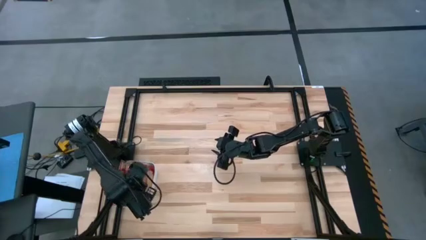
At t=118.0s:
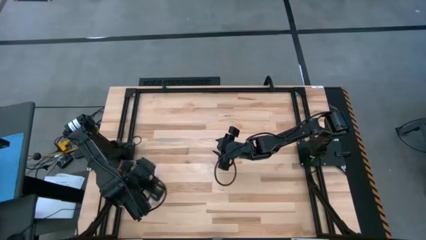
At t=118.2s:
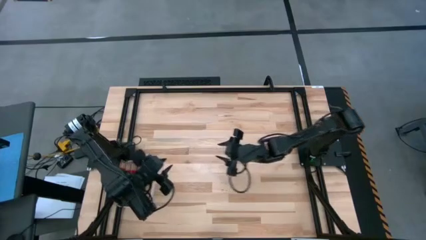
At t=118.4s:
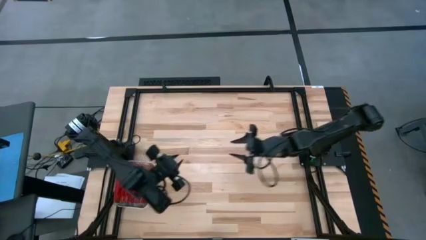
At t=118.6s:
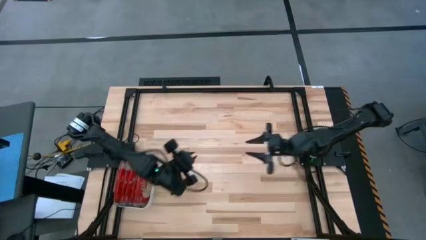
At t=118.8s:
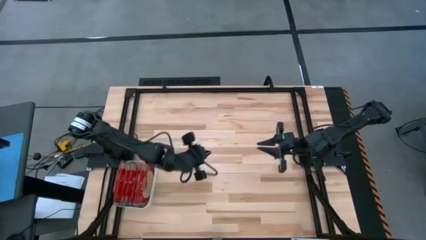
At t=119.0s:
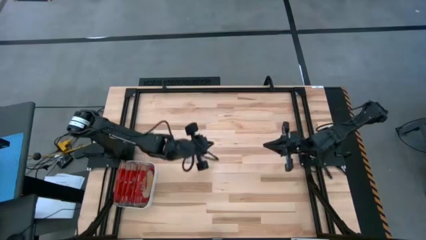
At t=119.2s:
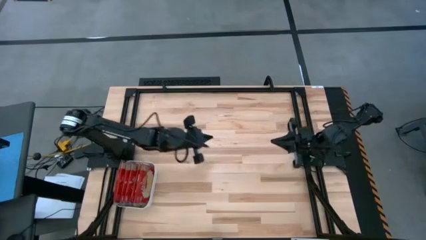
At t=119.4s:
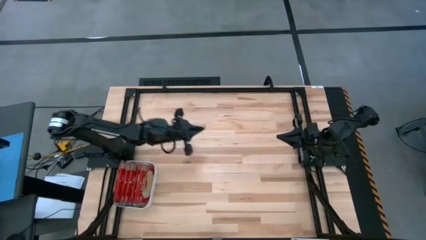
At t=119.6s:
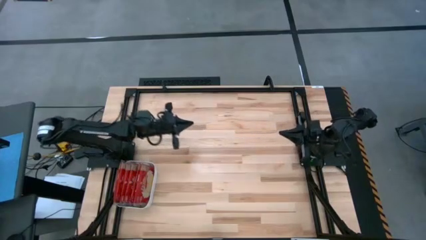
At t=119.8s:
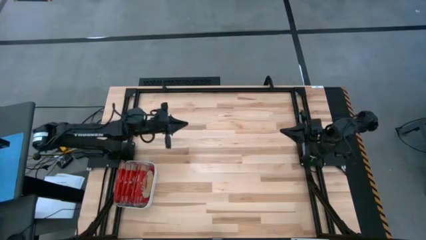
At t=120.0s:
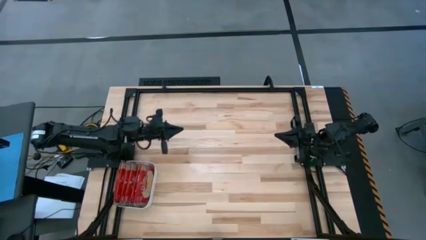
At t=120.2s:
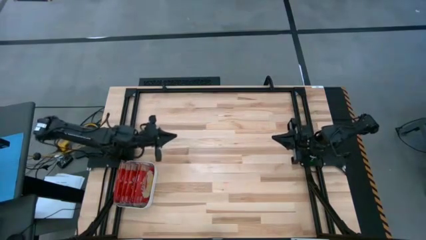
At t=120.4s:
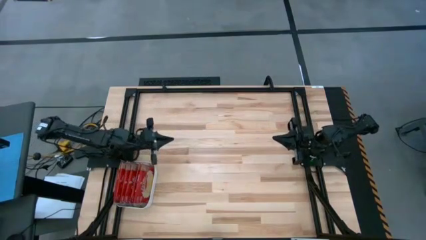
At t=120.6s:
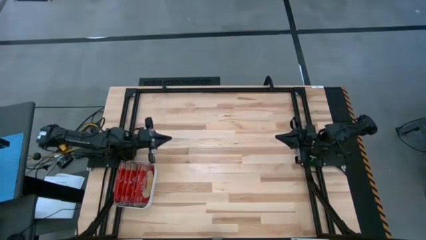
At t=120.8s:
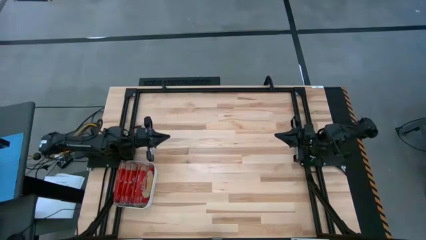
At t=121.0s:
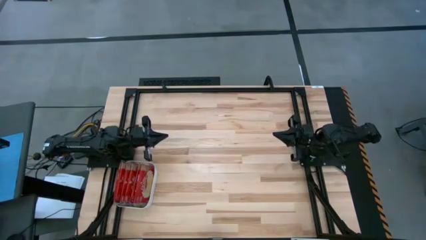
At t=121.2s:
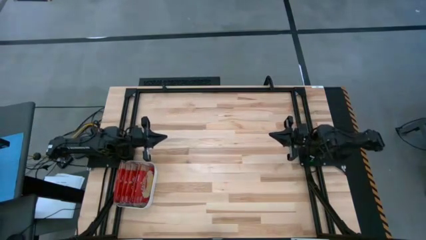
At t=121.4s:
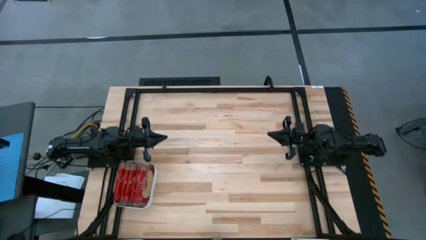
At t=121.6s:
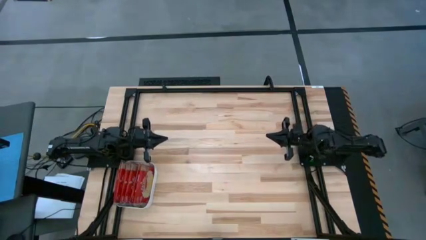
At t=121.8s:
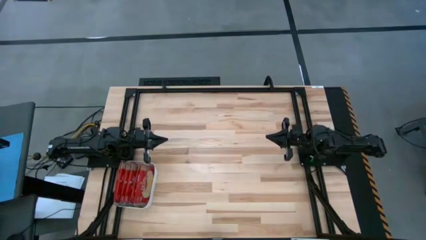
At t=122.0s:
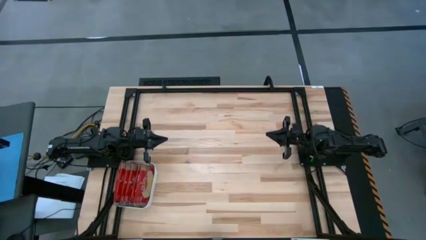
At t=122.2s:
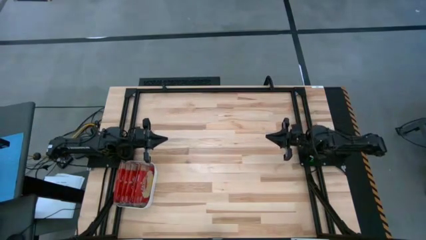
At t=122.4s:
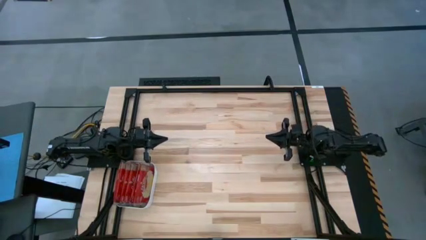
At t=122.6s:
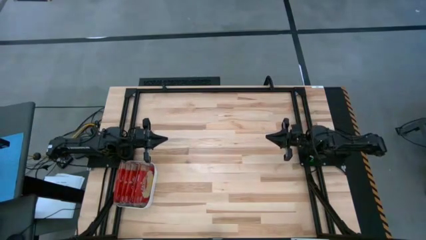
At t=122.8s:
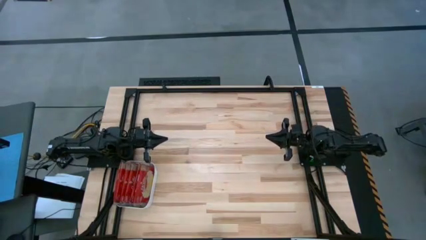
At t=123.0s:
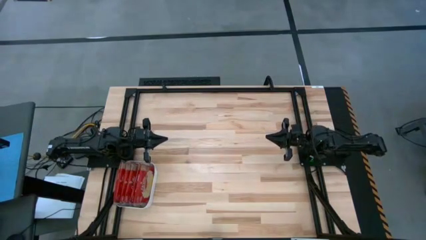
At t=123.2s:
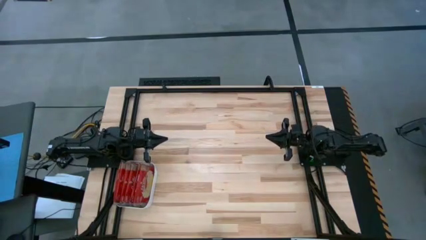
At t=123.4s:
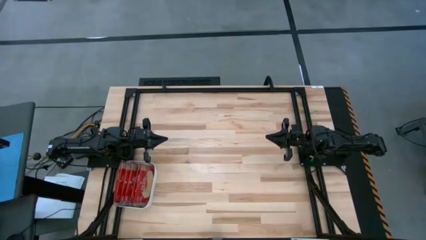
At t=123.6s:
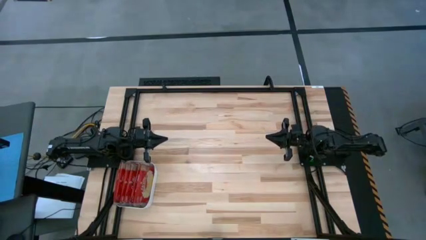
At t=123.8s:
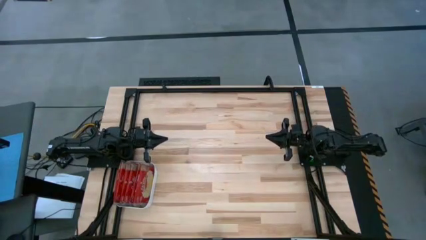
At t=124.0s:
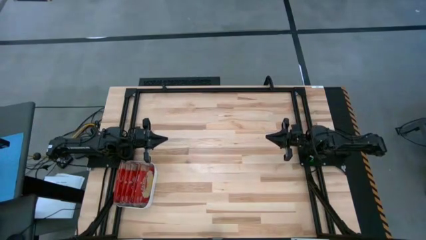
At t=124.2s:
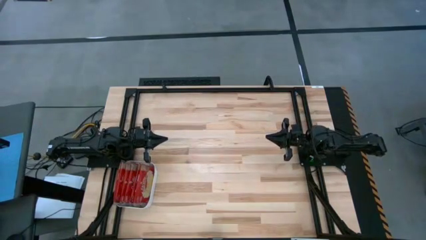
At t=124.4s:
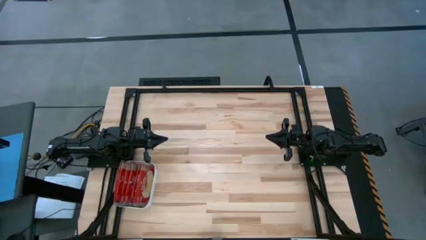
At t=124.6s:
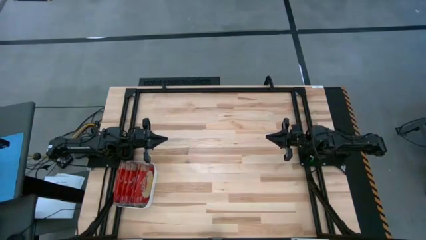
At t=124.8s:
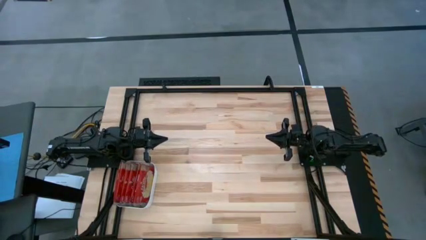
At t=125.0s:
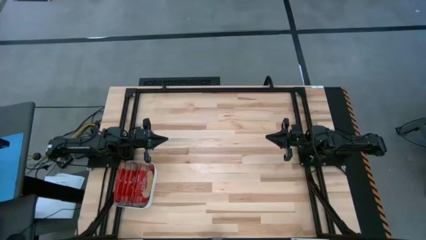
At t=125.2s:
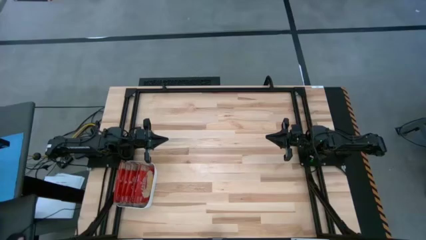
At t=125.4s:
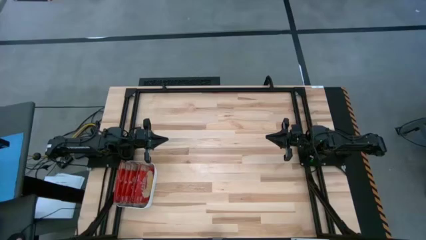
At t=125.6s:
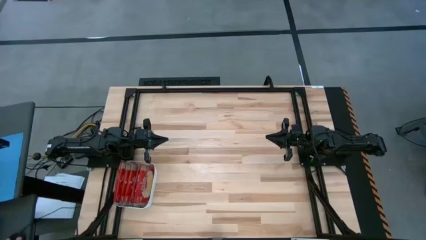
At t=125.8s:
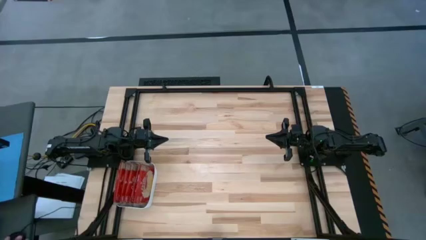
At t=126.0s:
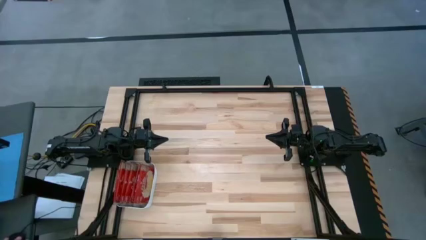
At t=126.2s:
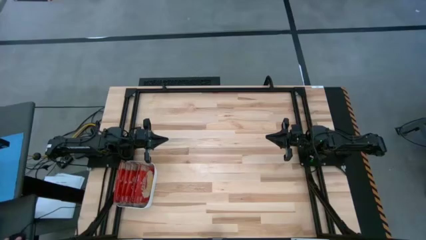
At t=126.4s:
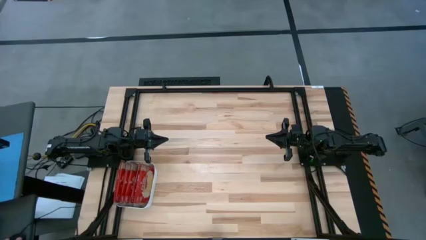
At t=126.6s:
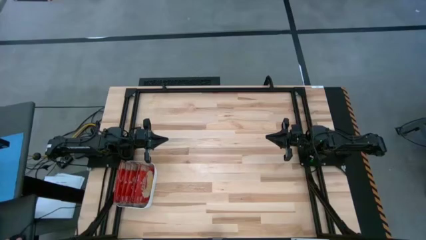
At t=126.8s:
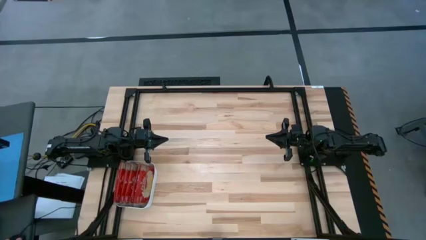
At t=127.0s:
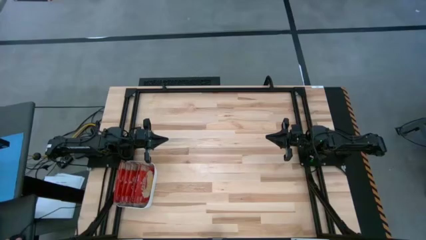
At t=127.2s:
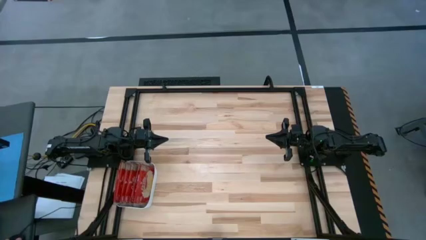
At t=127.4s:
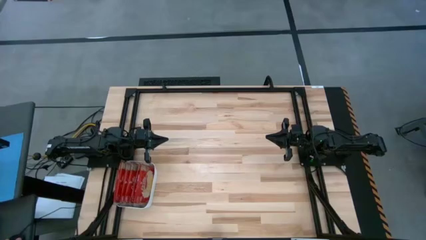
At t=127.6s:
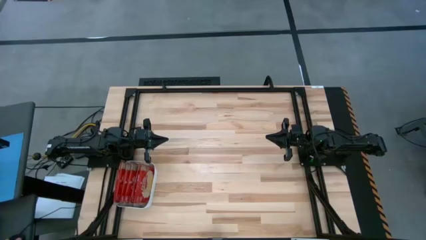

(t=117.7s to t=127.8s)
Task: Sort popcorn bags into baskets
Return to Home Position

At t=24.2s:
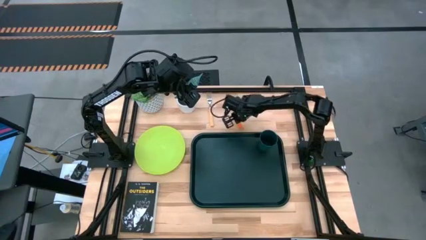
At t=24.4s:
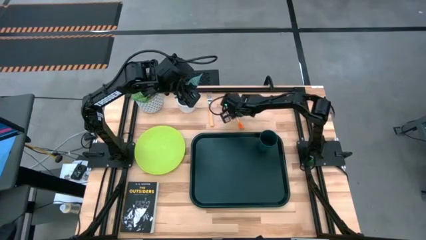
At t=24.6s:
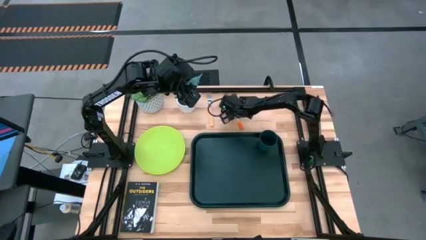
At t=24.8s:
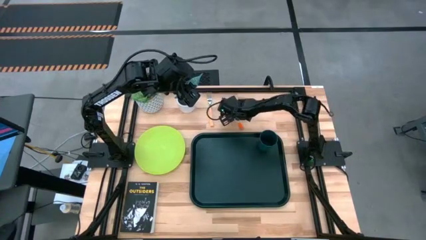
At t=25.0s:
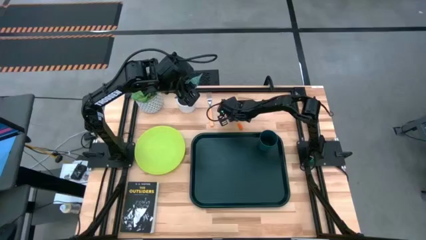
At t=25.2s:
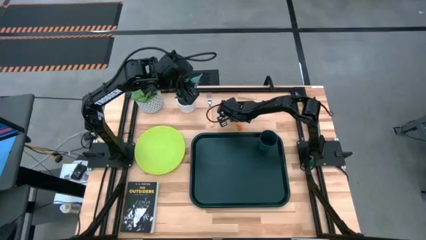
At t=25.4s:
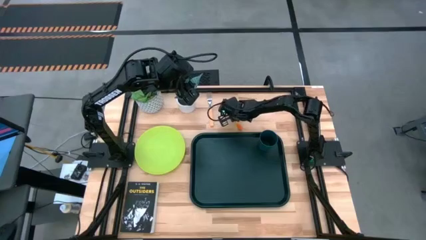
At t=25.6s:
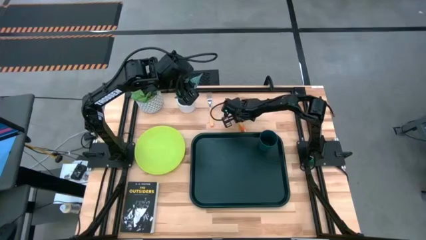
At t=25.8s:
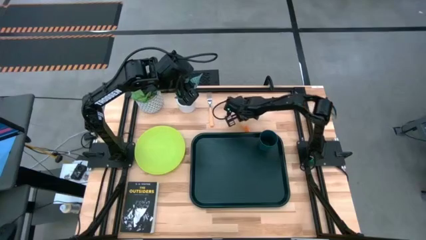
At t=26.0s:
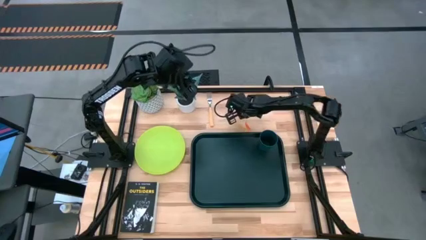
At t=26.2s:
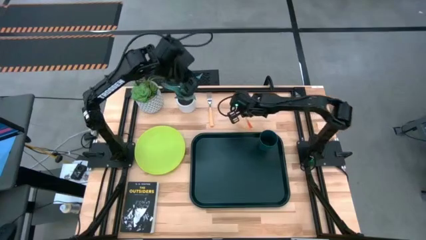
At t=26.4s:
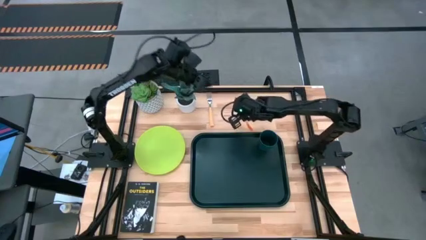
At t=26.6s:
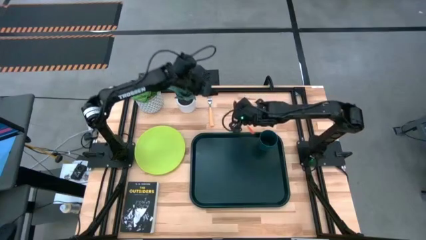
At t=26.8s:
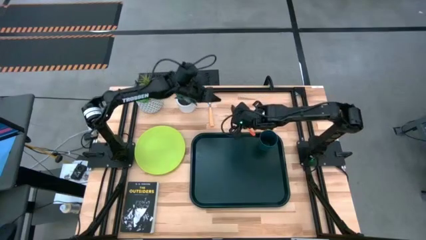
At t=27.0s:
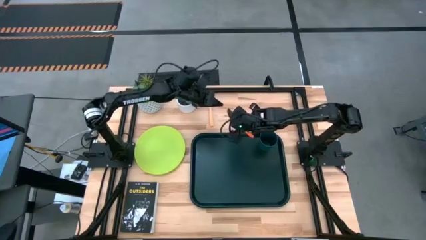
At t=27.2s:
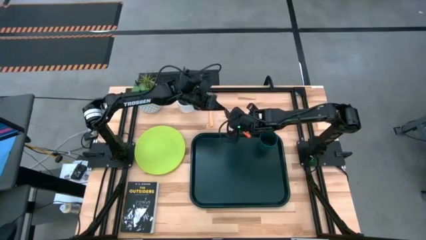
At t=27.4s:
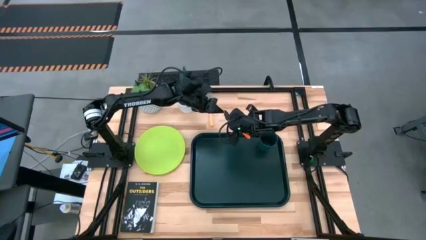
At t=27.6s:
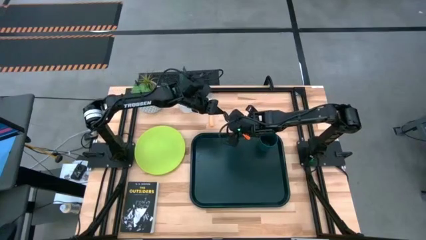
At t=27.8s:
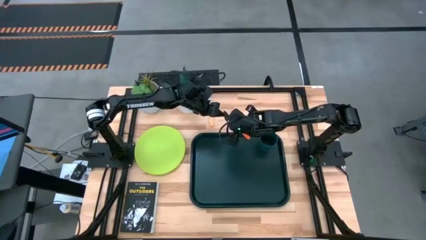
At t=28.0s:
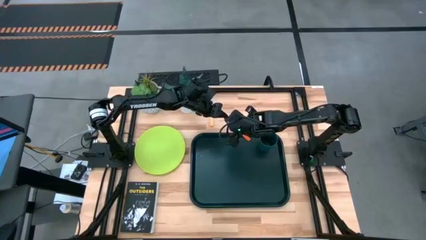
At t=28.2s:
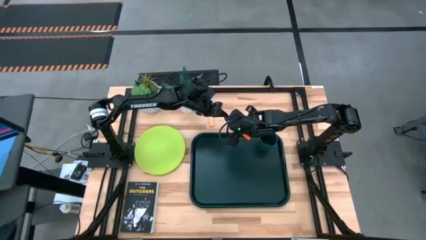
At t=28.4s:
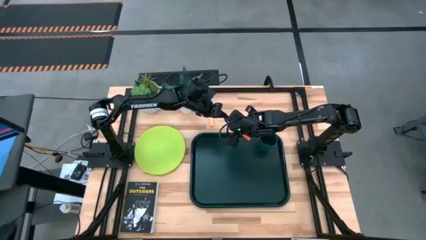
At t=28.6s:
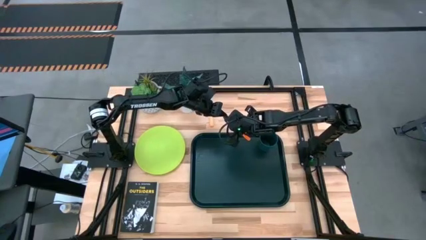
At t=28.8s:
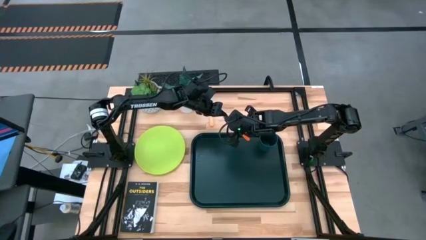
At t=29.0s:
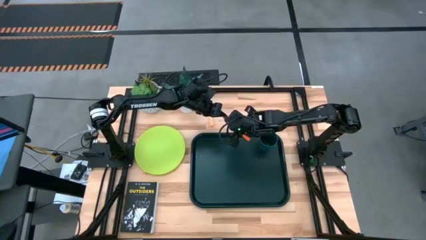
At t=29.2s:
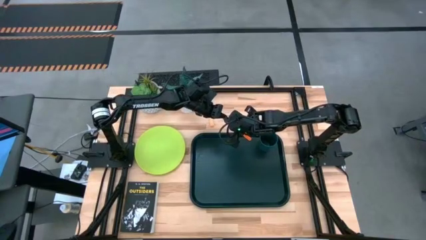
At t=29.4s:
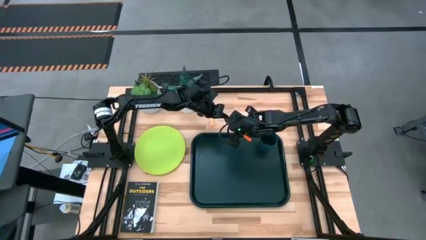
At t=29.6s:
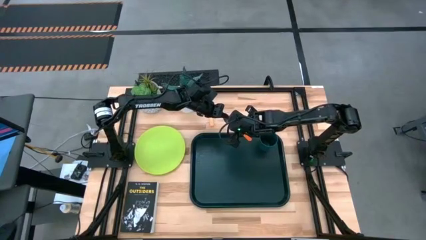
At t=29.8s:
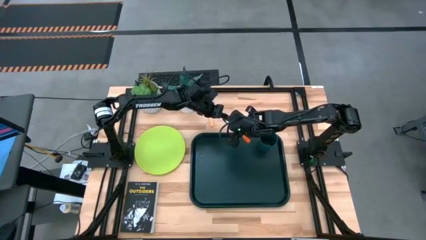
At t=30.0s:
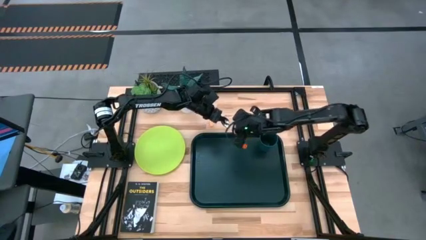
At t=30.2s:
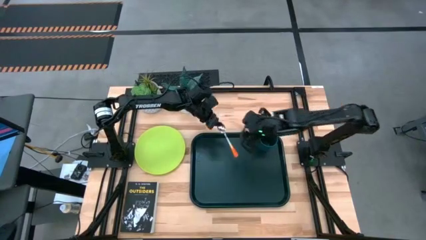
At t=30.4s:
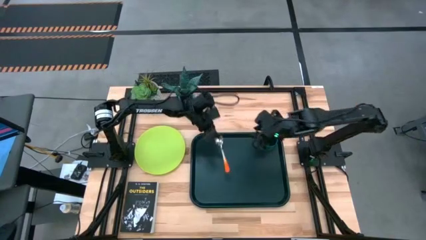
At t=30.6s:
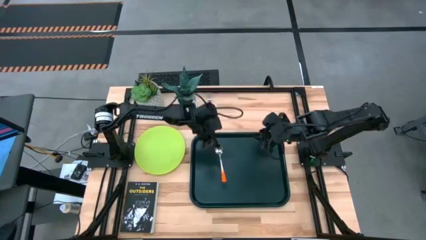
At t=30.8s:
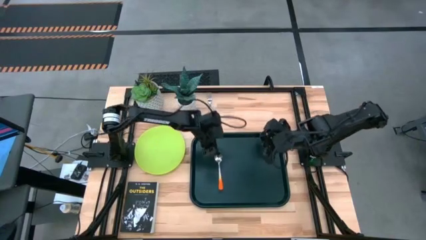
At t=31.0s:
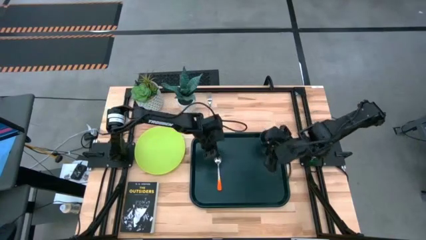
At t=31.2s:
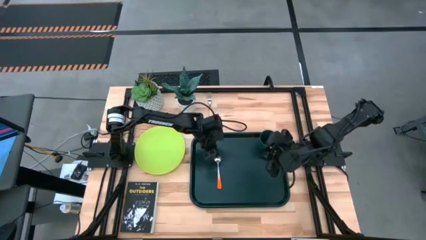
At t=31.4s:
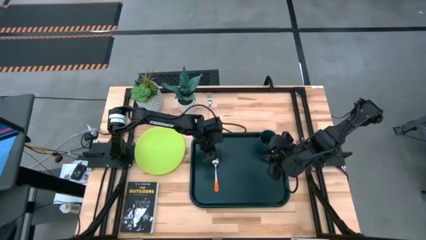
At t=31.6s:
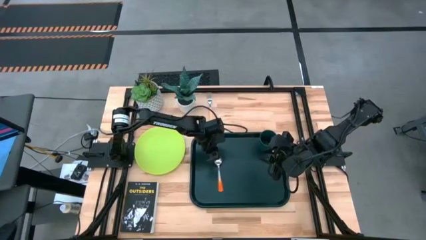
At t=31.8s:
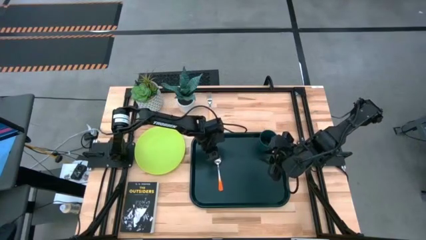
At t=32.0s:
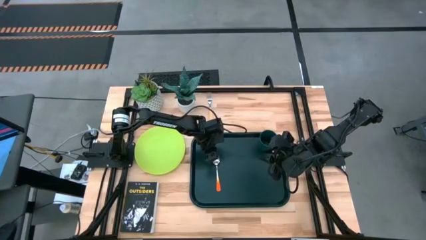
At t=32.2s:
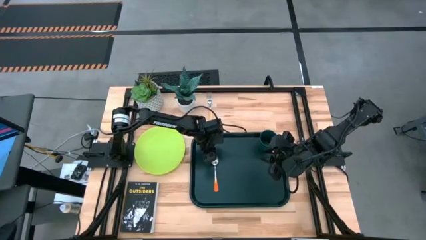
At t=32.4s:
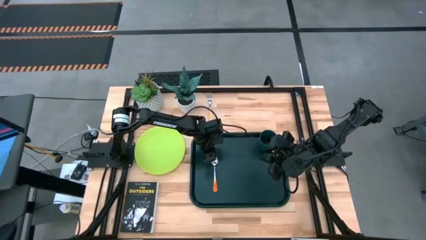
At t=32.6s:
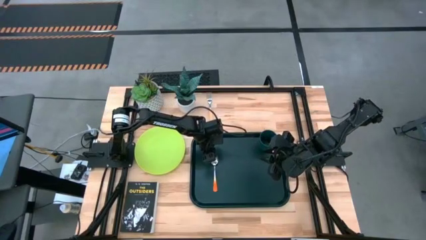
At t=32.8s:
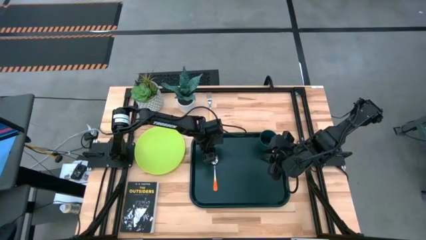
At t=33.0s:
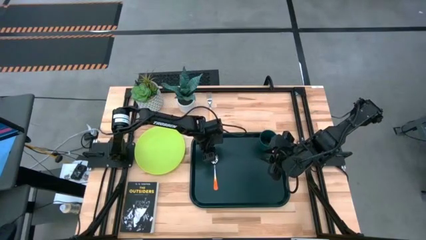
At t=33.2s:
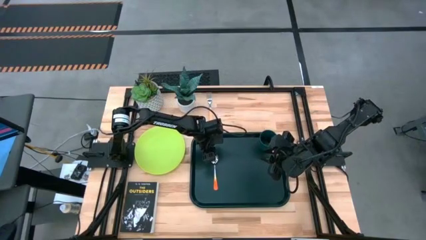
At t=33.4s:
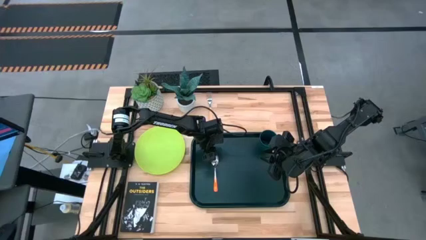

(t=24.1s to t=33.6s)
Task: Pick and place plate/cup/fork/spoon on tray
Put the orange white spoon on the left side of the black tray
